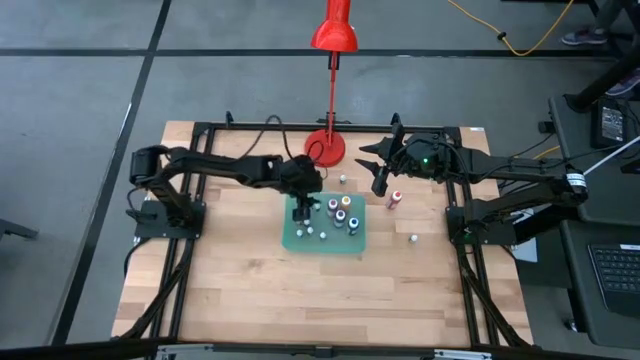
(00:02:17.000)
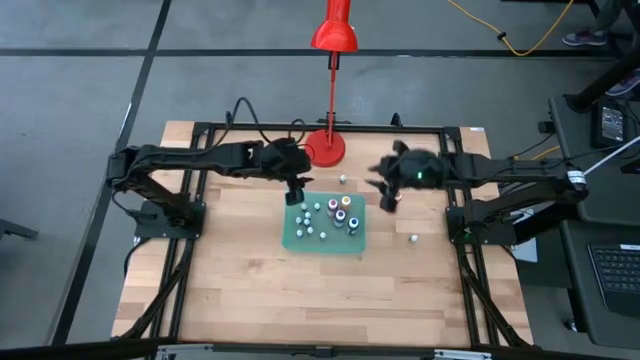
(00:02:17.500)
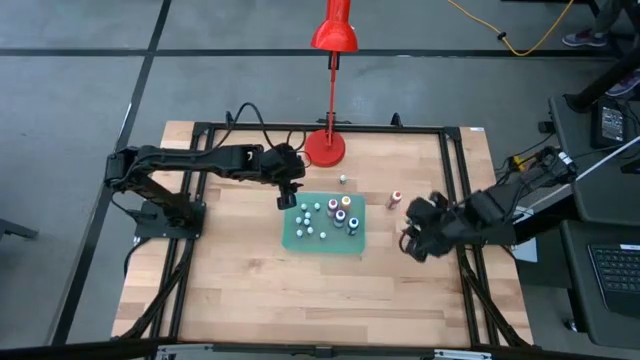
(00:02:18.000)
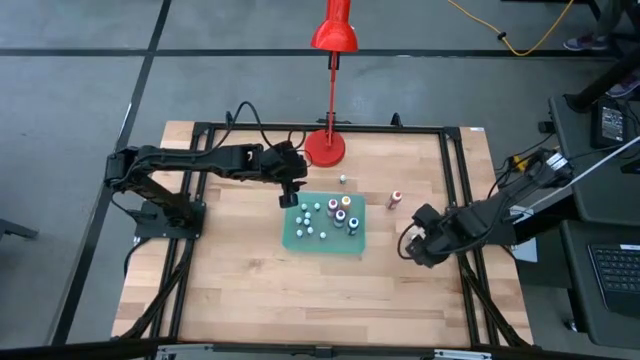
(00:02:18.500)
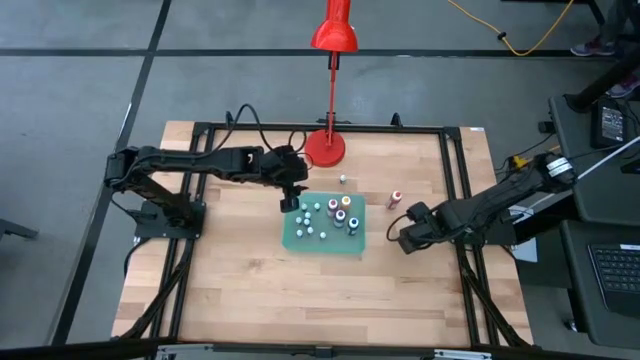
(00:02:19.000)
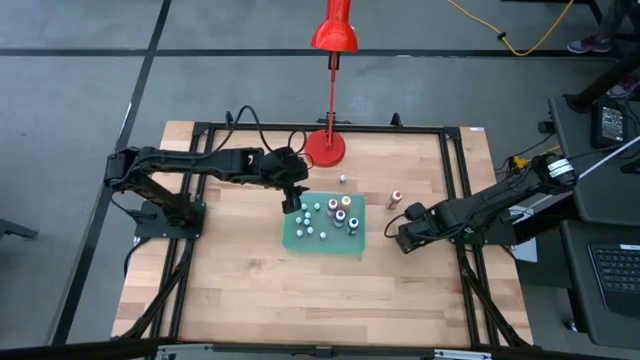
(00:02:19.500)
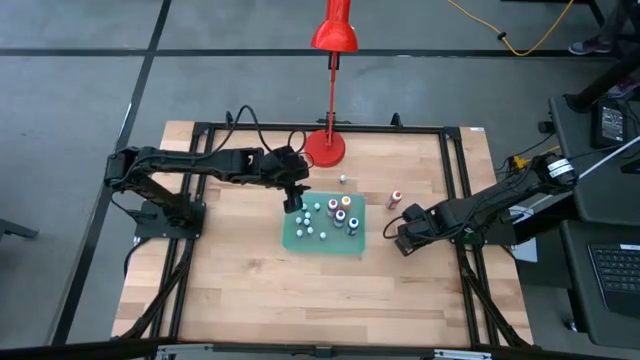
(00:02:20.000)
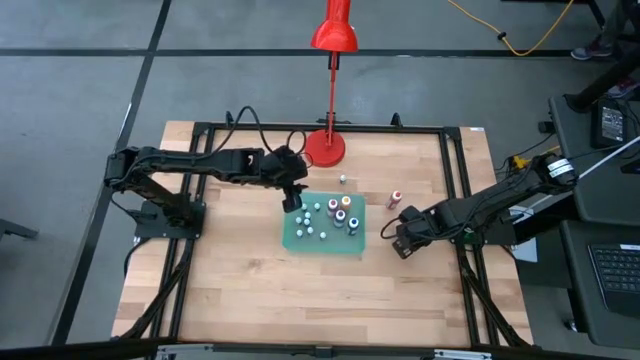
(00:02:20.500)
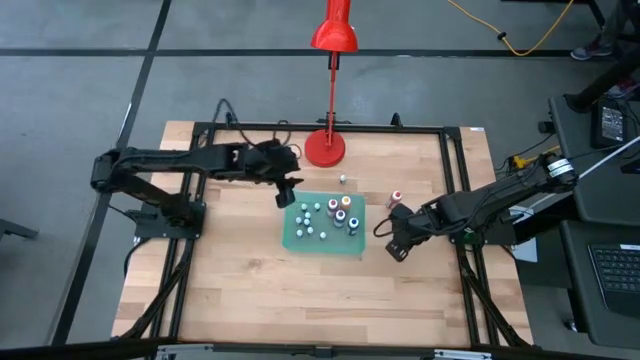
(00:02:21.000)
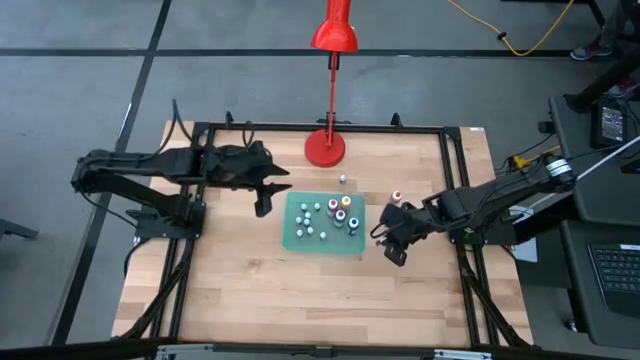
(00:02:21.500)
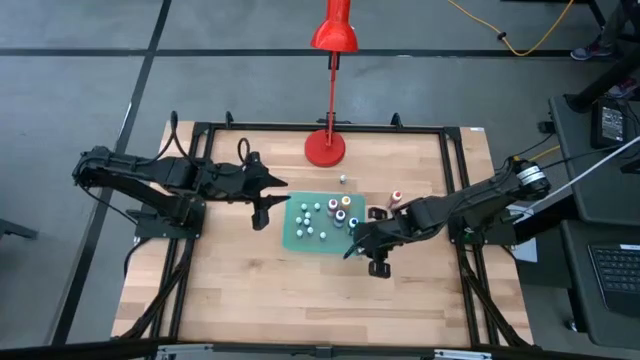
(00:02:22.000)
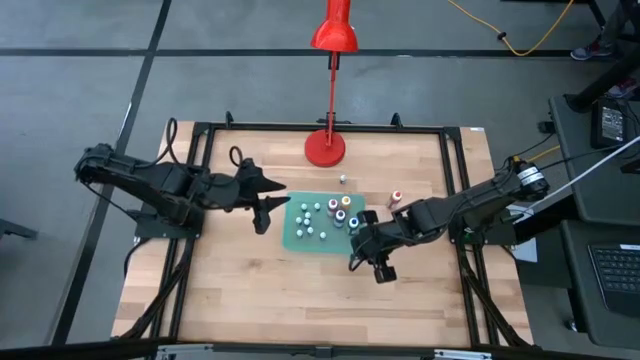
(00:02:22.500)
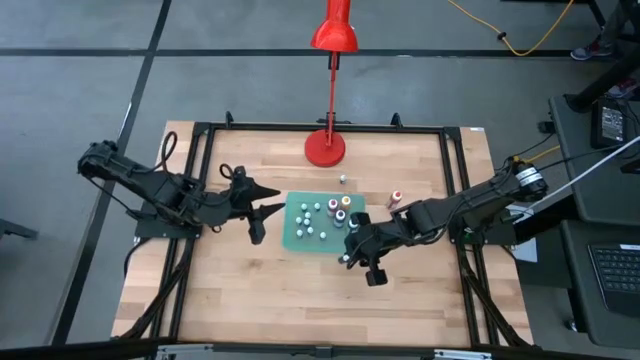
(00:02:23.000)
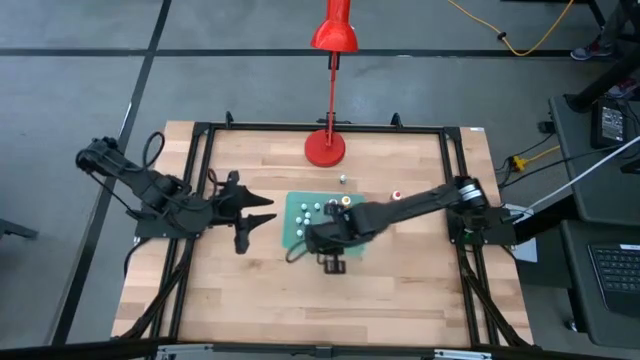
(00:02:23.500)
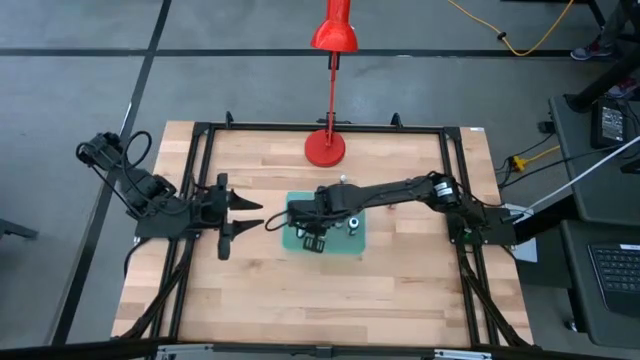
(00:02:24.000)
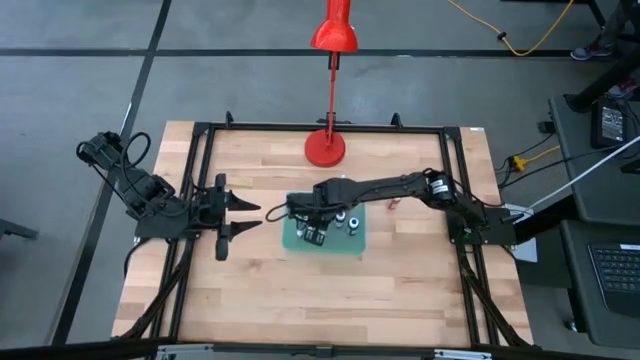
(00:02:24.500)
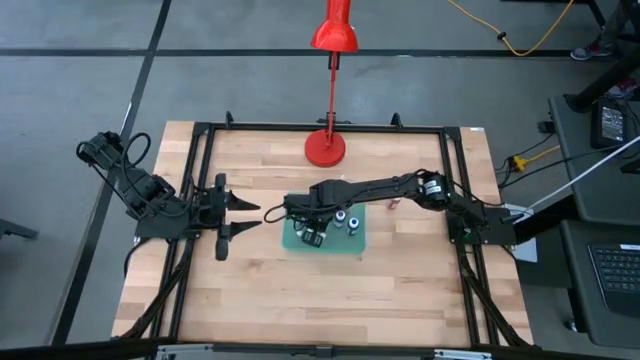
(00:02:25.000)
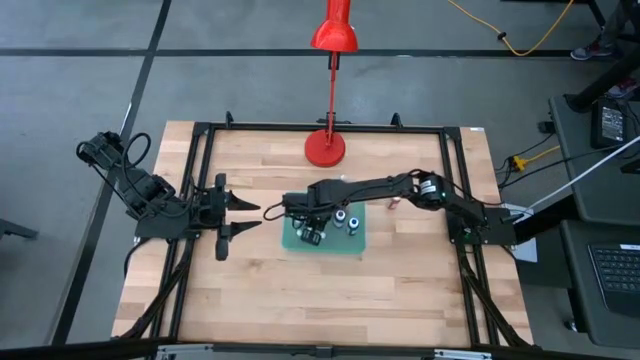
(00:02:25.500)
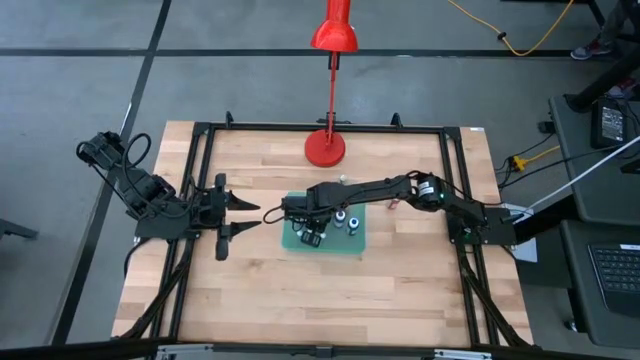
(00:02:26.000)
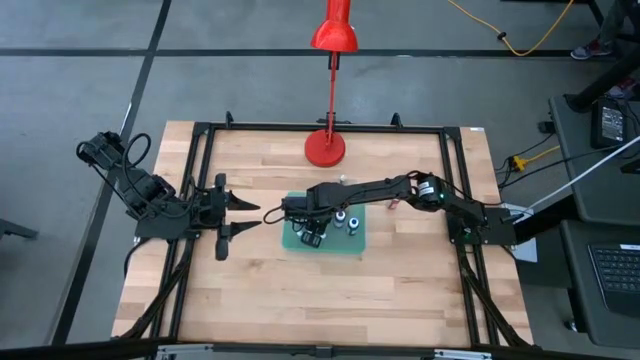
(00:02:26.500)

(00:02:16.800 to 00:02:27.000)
Task: Pick & Place food coloring
Put the small brown food coloring bottle into the green bin

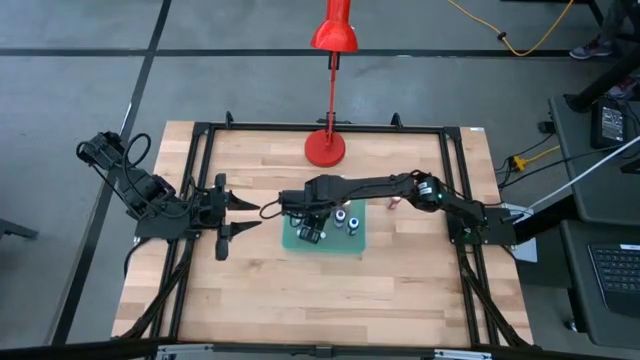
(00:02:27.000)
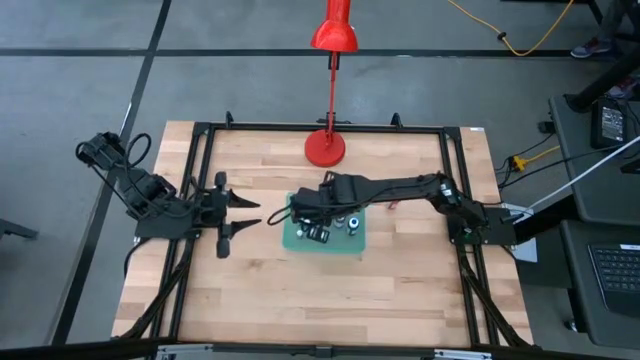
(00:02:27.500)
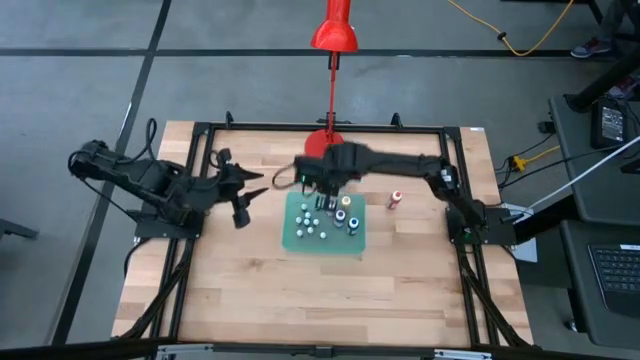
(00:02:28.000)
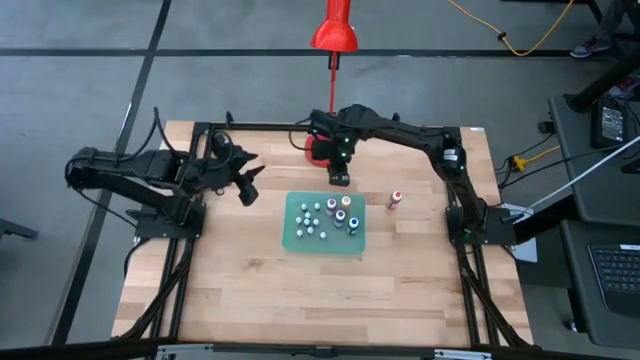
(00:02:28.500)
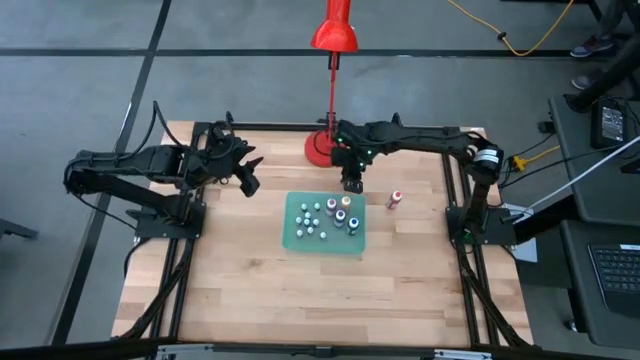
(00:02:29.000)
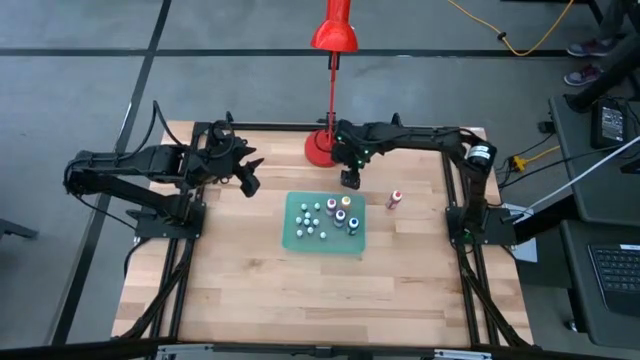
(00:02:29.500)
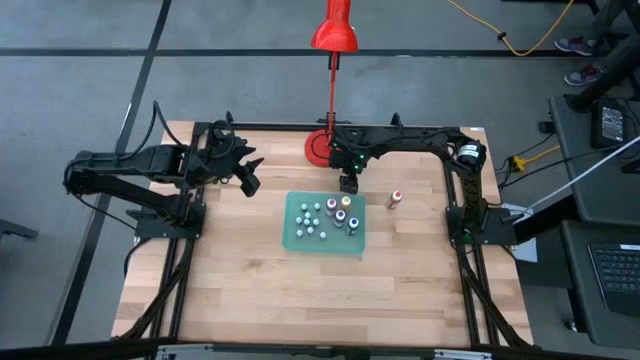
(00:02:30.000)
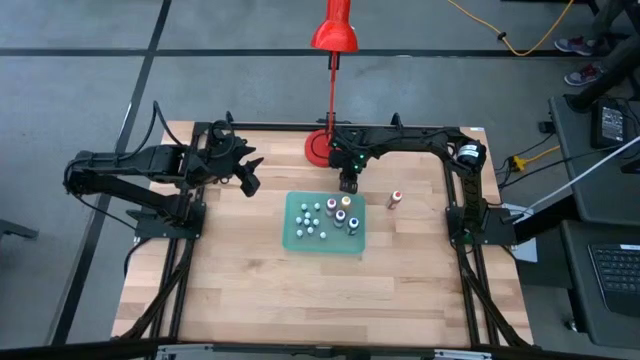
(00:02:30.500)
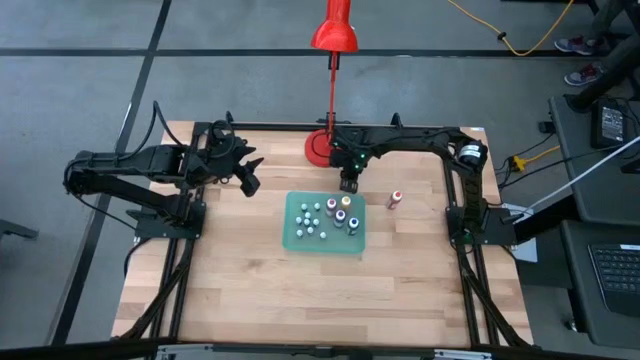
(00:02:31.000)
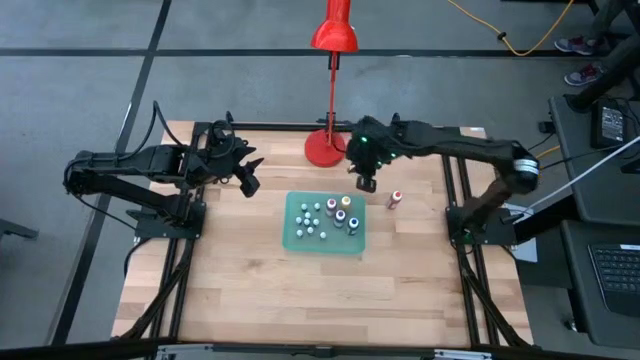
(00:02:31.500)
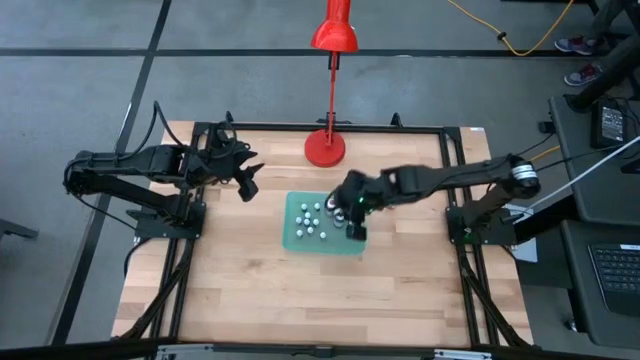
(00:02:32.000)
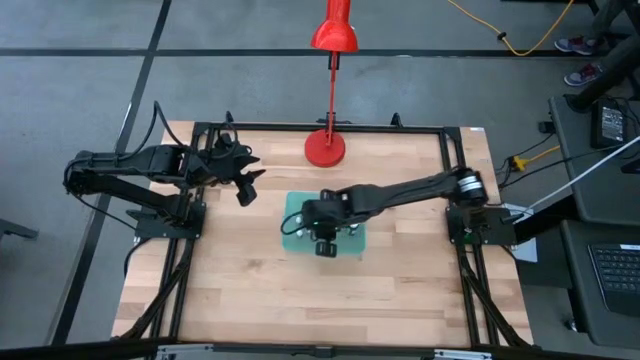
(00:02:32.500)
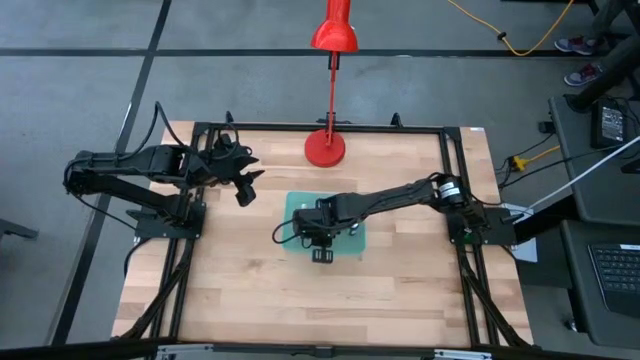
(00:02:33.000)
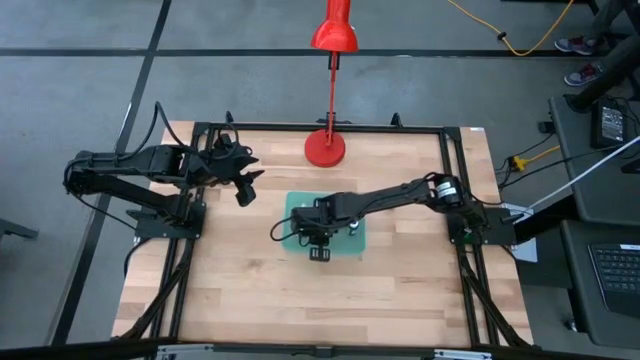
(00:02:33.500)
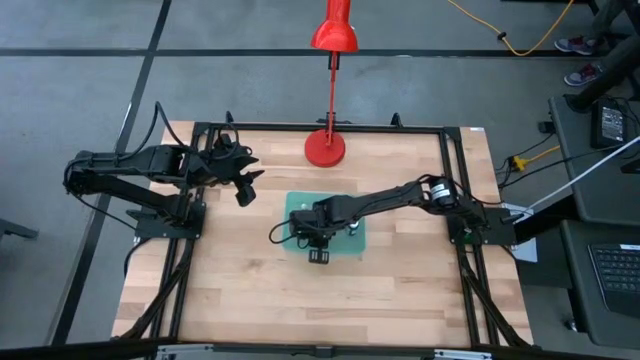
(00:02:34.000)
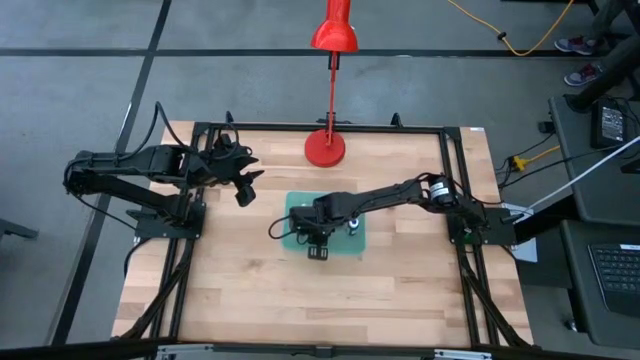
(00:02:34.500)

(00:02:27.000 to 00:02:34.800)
Put the small green food coloring bottle into the green bin

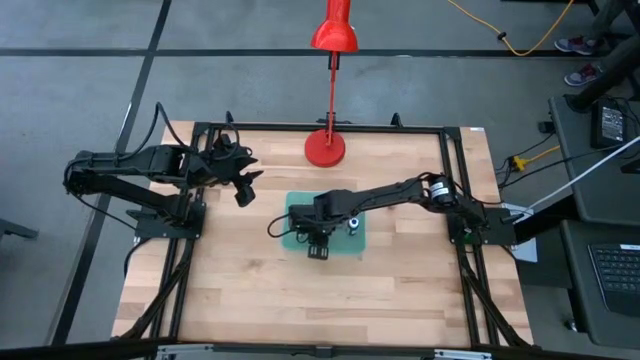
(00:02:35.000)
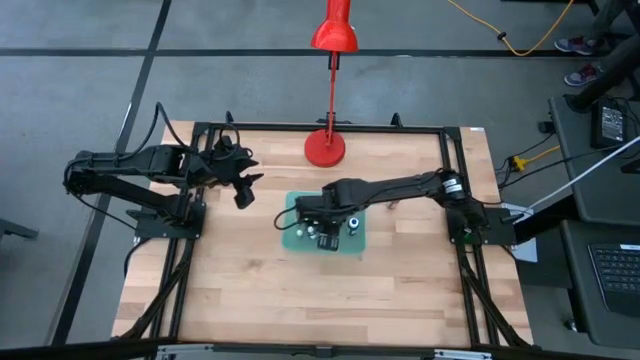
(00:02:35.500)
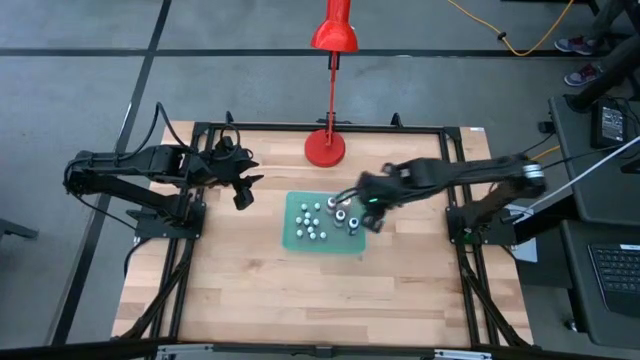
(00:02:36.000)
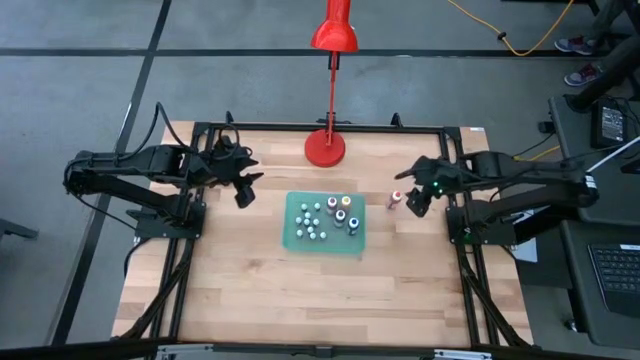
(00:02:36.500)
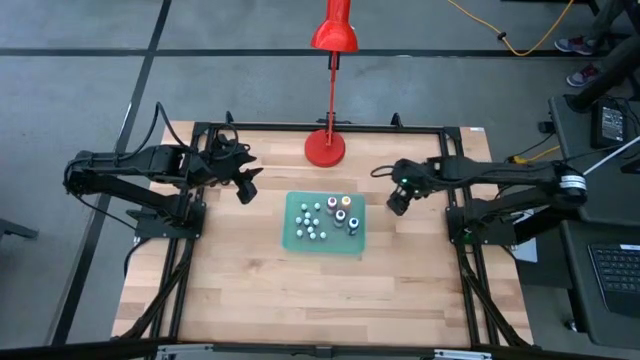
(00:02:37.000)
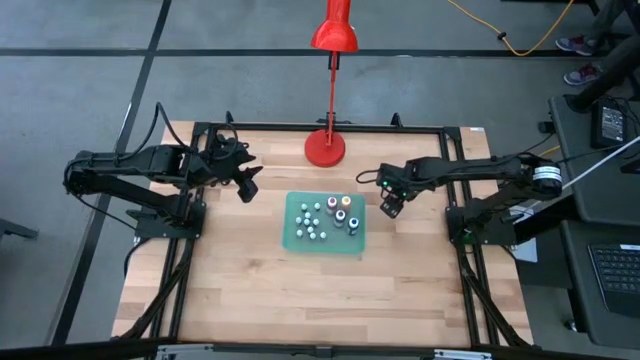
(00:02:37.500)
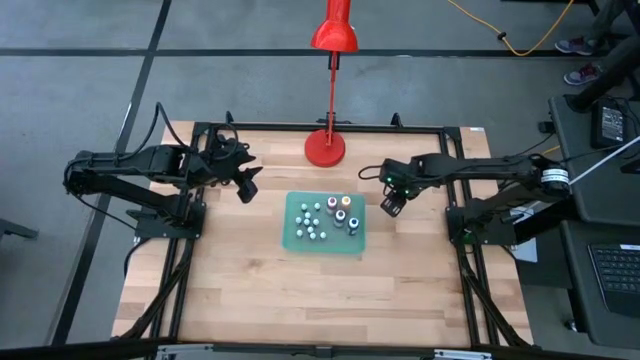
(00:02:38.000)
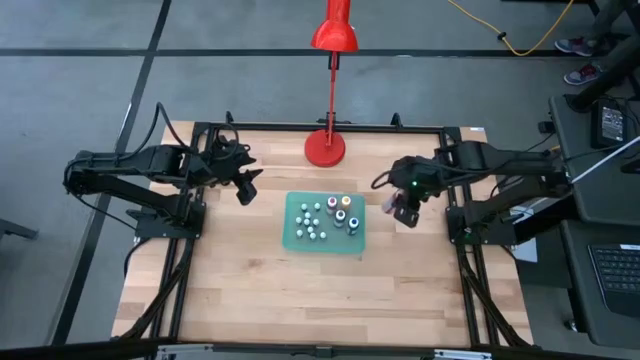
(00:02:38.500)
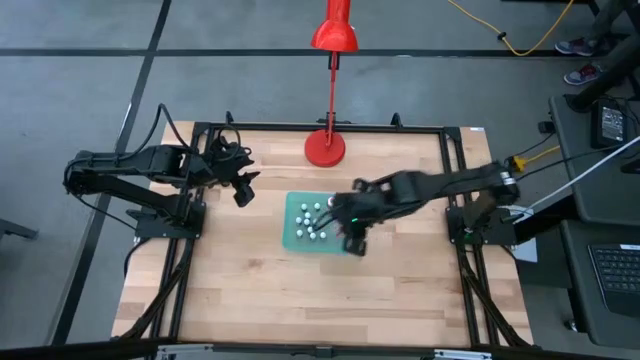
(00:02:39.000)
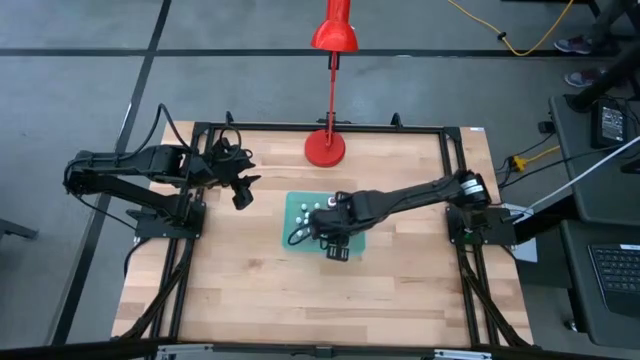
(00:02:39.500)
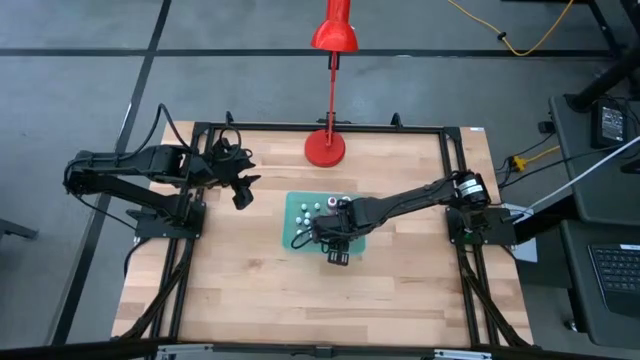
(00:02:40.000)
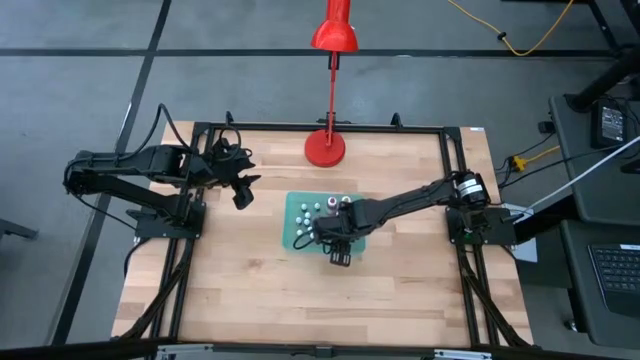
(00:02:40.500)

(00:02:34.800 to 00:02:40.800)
Put the large orange food coloring bottle into the green bin
